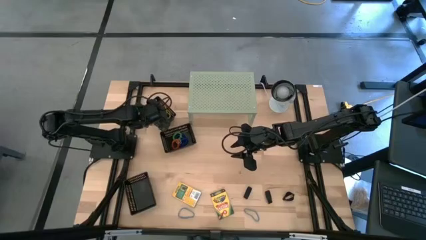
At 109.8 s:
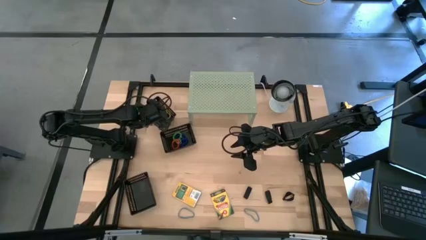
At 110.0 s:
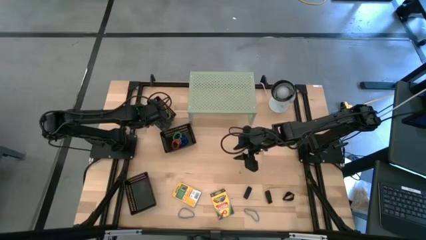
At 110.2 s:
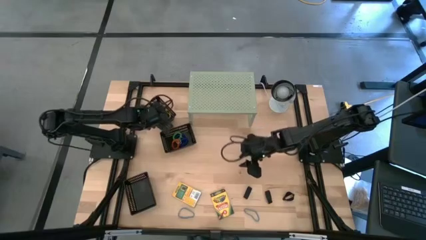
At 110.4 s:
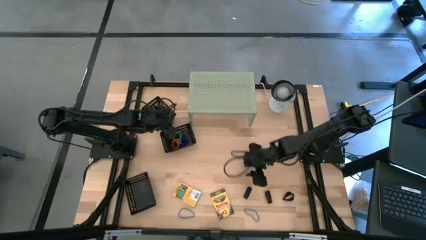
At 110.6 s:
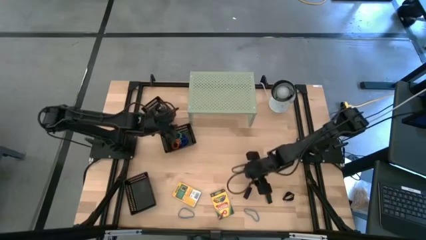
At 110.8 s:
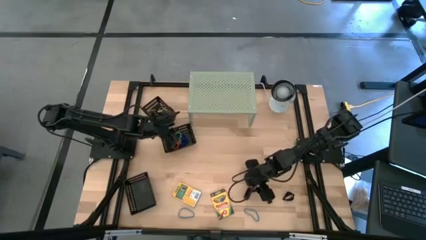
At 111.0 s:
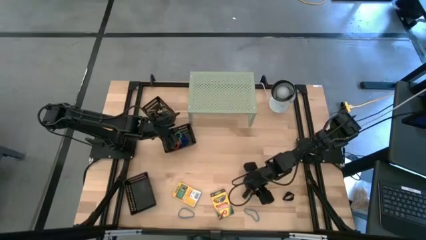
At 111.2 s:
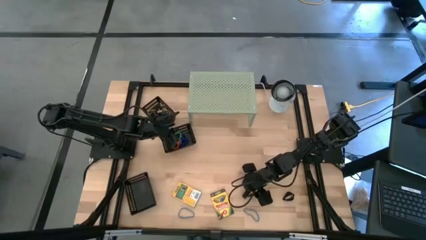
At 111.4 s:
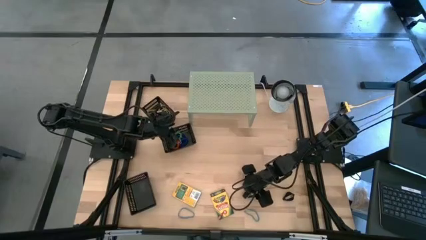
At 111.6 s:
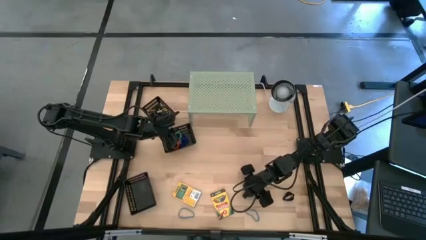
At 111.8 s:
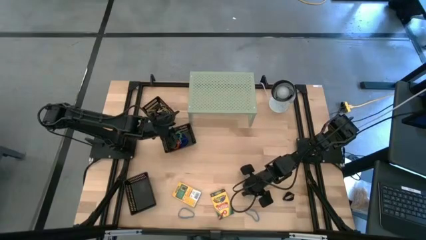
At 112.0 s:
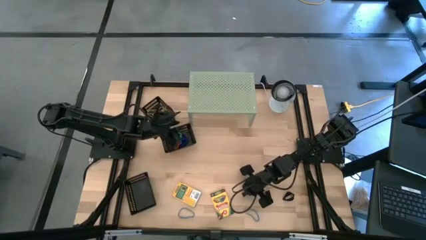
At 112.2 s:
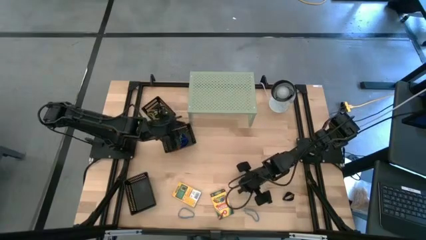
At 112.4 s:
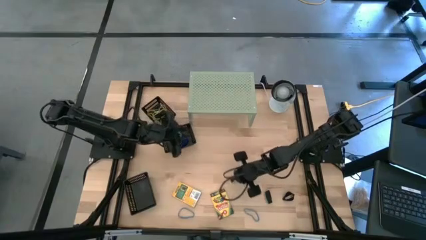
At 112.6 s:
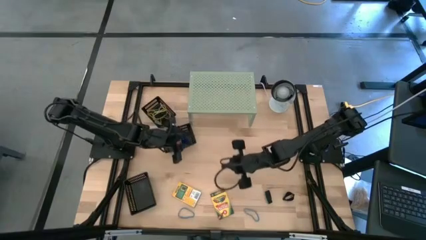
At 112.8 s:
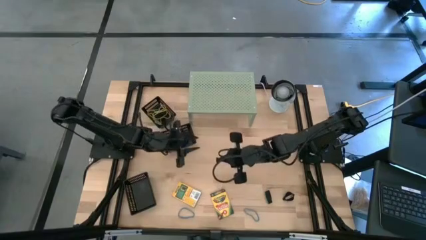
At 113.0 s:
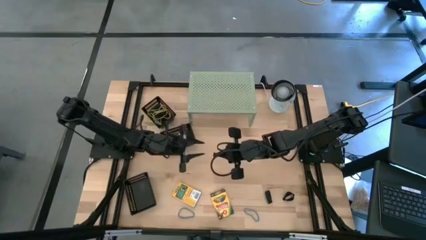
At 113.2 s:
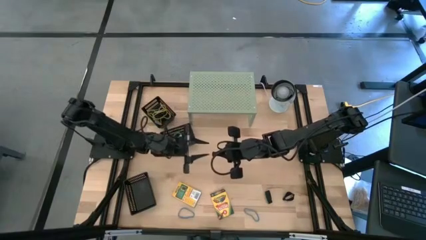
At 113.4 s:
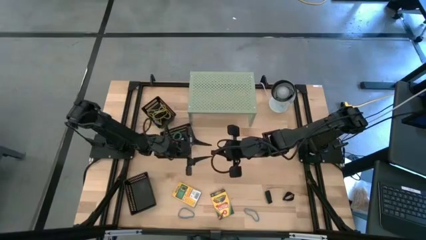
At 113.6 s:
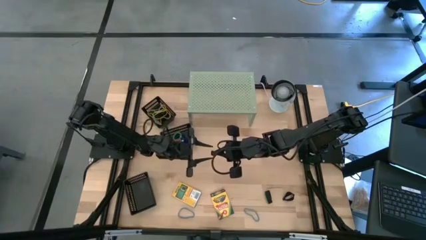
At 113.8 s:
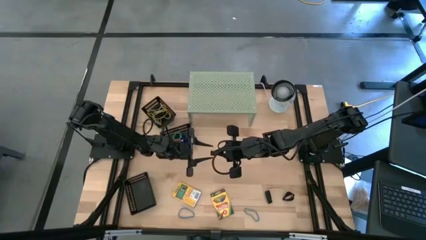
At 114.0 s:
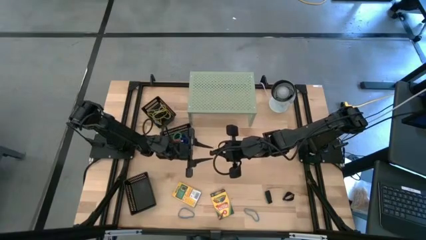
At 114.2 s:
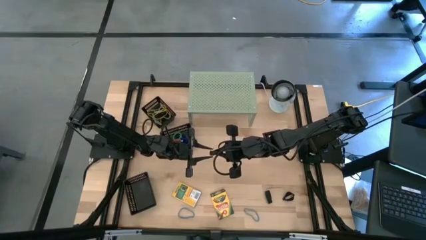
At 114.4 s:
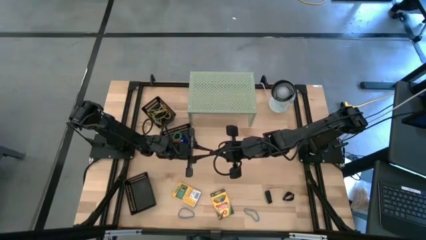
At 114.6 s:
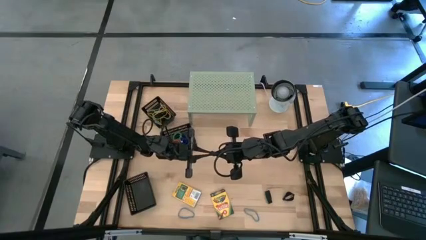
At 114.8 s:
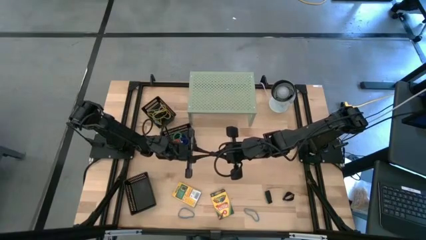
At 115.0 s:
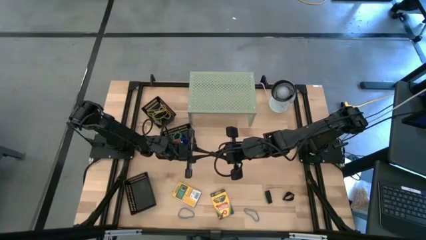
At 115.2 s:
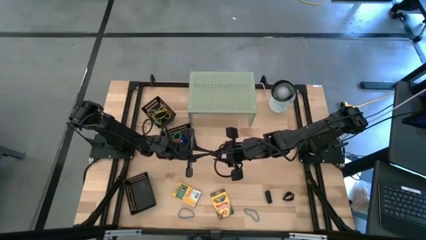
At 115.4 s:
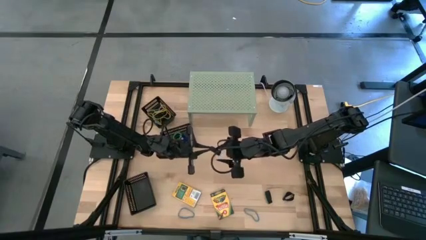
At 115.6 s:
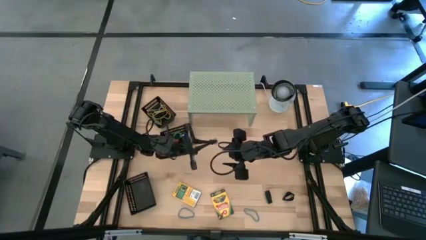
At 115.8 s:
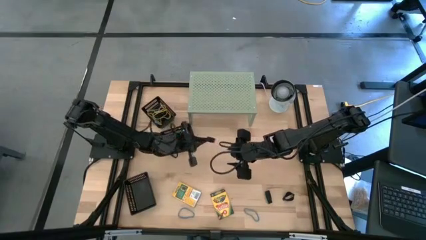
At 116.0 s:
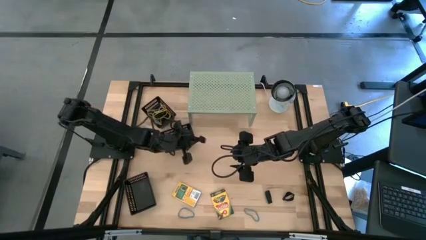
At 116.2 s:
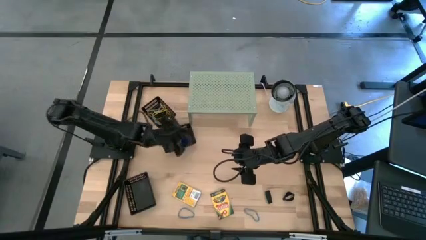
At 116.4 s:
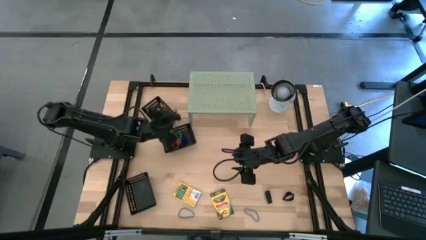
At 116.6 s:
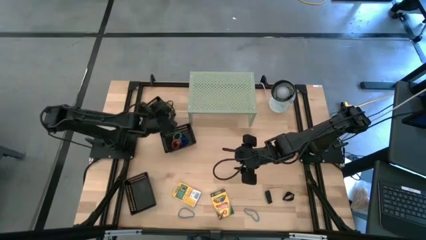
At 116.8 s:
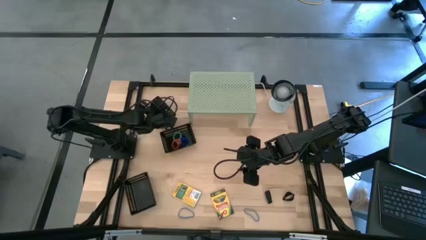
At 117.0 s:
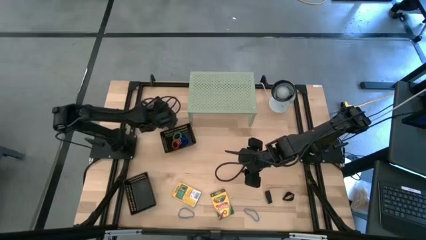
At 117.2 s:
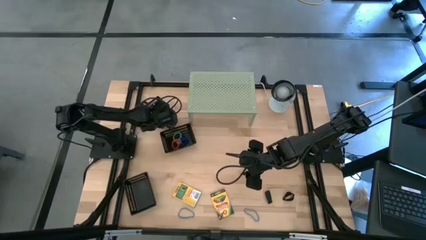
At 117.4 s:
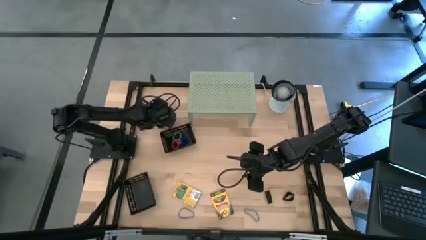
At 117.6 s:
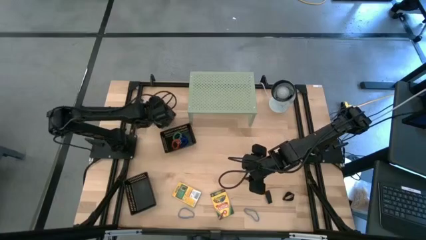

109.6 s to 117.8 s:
Task: Pick & Place Office Desk Supplies
Put the black rubber band into the top black bin

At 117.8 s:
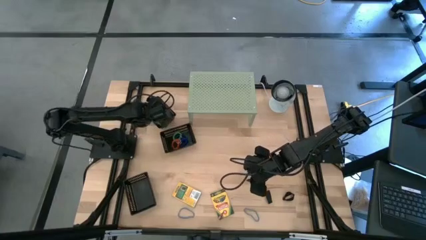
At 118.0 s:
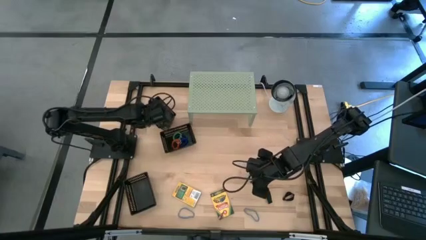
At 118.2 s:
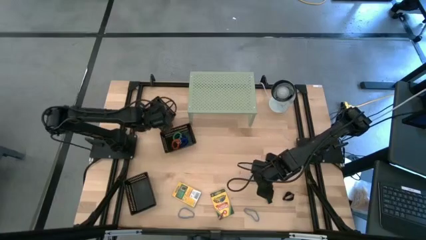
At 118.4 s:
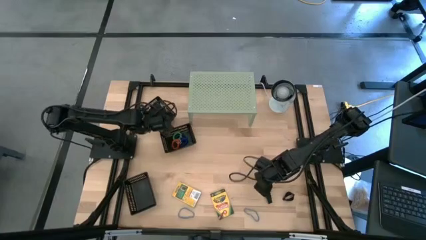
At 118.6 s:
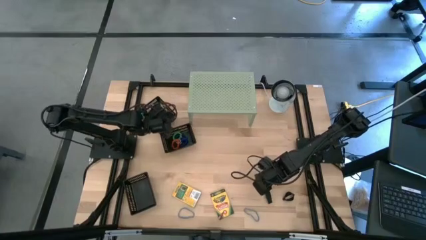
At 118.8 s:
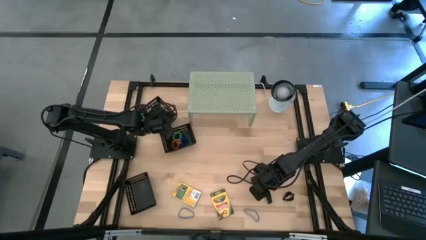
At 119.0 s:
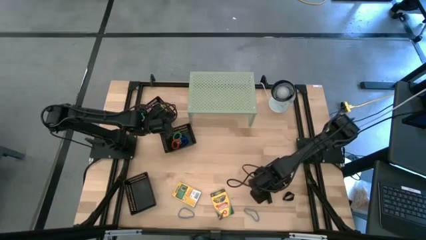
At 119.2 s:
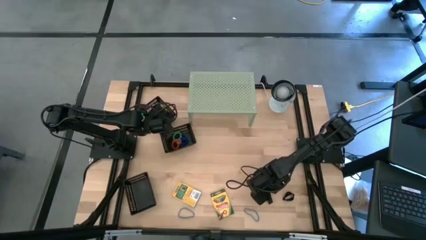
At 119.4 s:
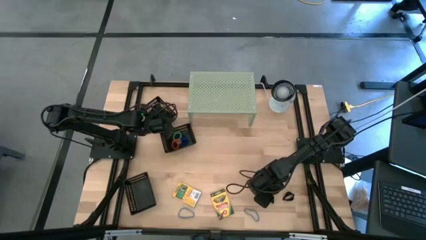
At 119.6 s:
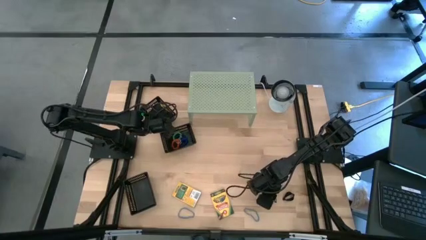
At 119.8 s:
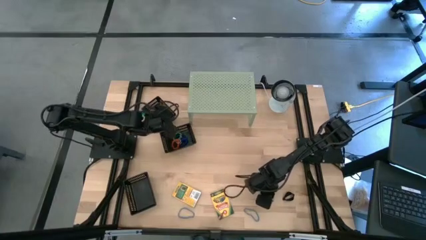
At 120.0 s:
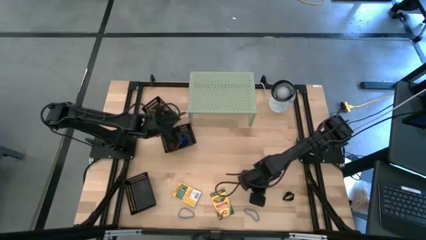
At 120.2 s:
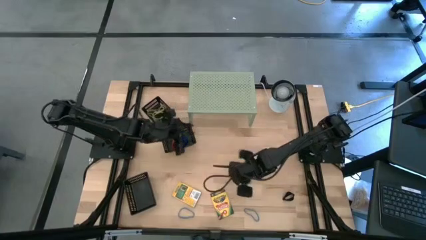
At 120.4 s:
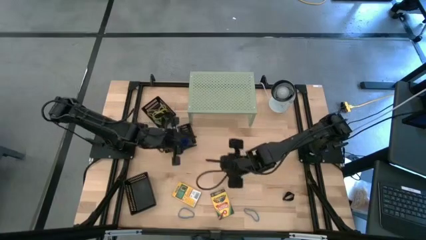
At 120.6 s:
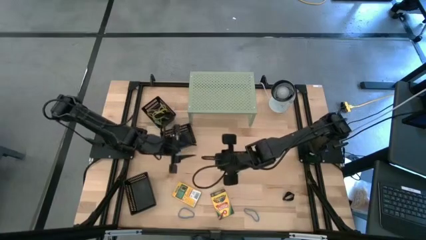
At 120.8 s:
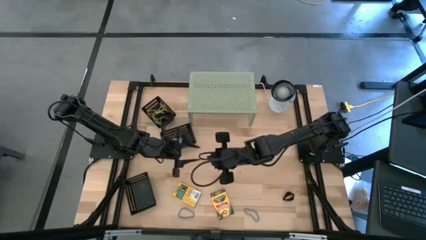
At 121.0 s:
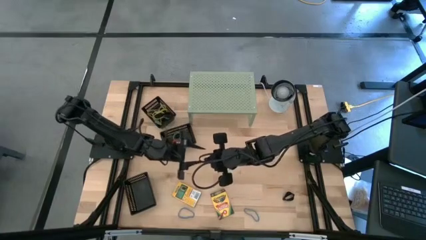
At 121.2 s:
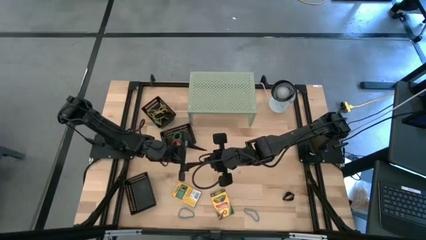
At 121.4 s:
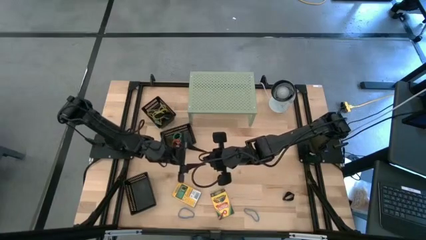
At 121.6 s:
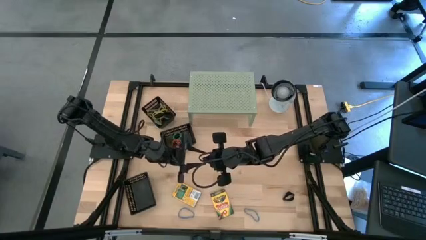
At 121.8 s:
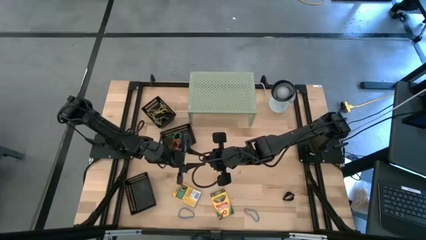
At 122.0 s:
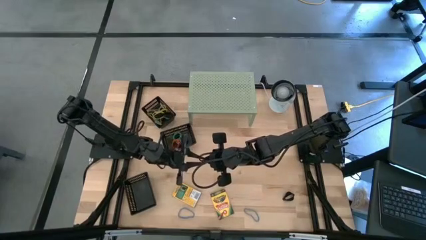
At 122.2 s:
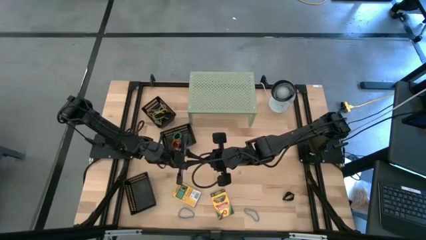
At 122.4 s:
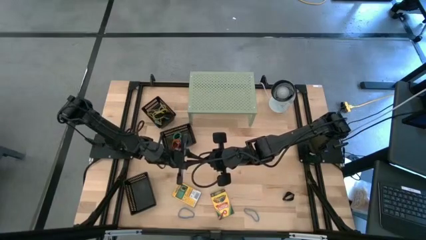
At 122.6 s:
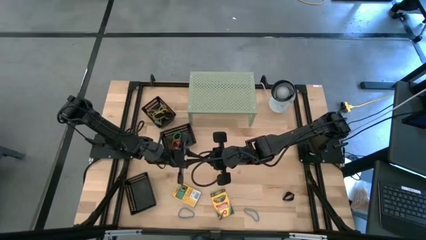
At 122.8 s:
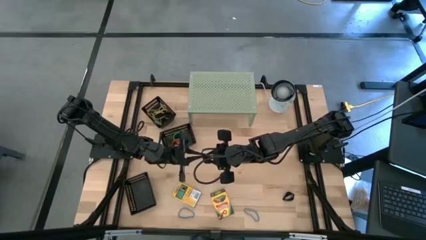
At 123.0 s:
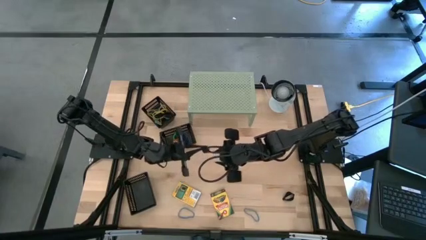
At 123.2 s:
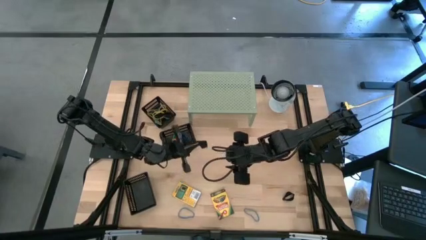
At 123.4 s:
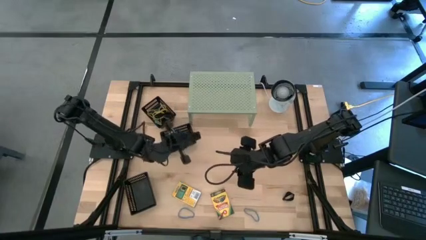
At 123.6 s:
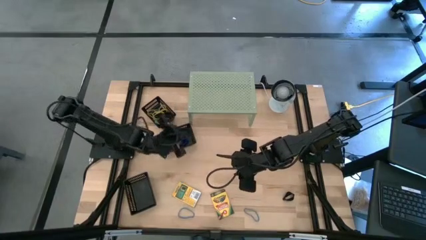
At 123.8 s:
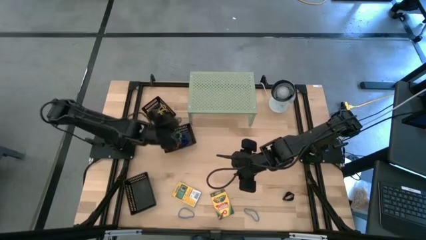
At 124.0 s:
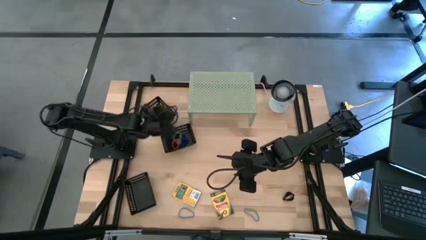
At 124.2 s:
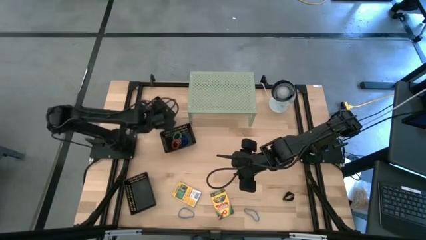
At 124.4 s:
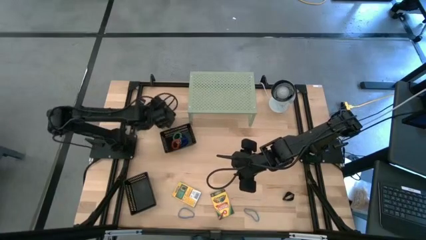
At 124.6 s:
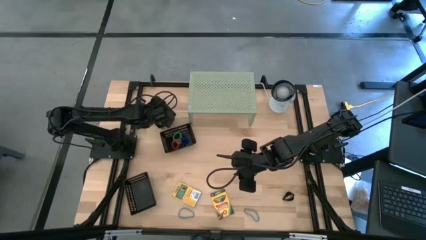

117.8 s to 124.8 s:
Put the black rubber band into the top black bin
